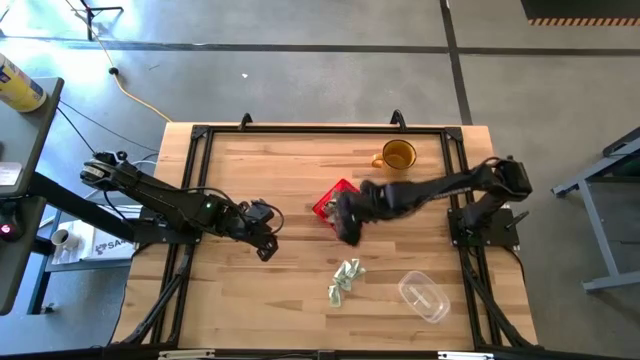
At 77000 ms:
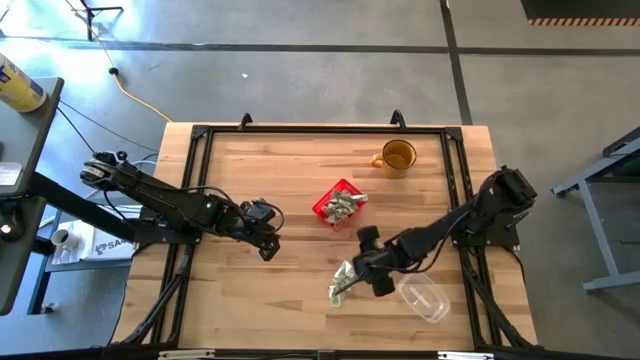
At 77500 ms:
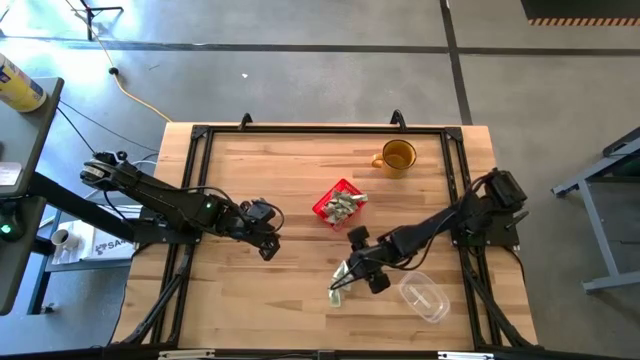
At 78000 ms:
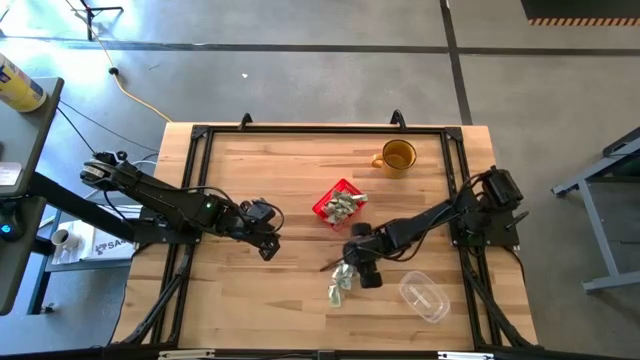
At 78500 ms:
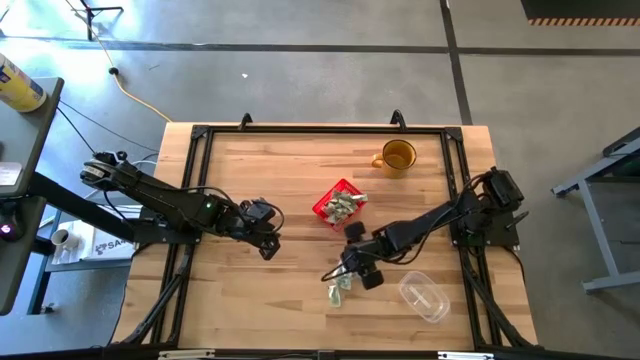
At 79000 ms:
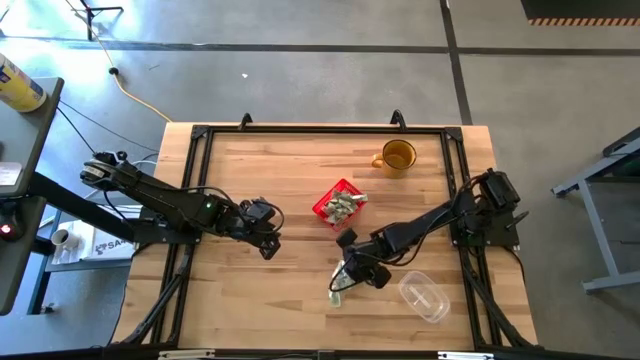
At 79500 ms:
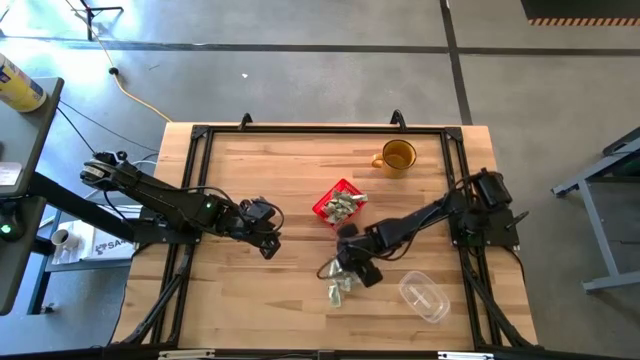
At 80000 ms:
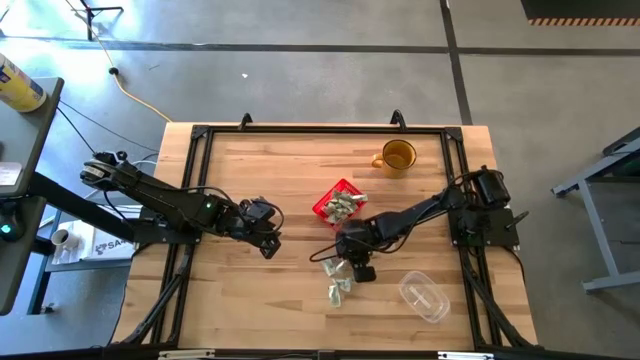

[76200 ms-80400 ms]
Task: Pick and place items into bin
Put the white stevia packet into the red bin

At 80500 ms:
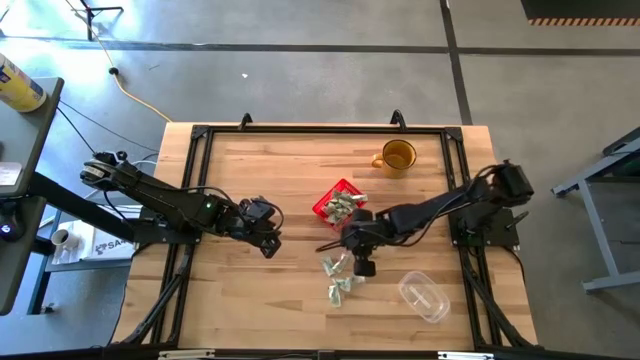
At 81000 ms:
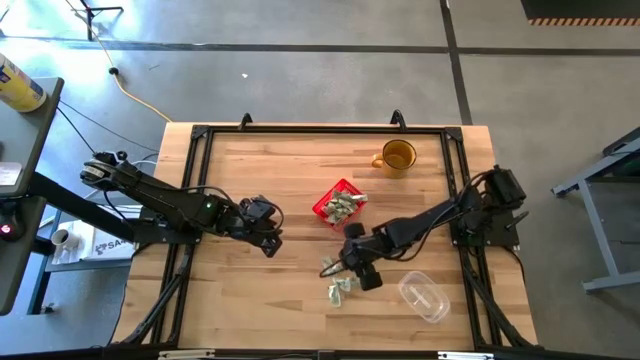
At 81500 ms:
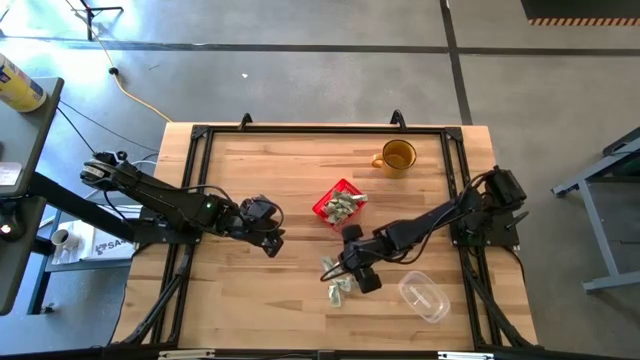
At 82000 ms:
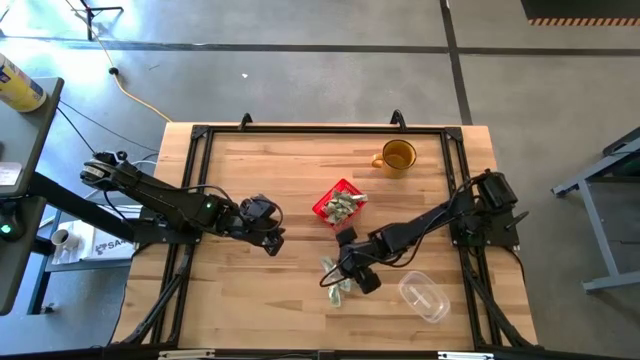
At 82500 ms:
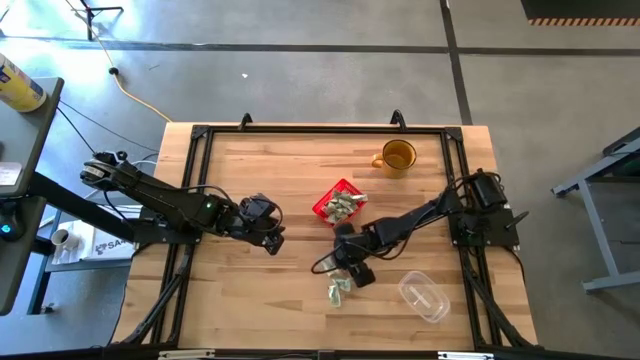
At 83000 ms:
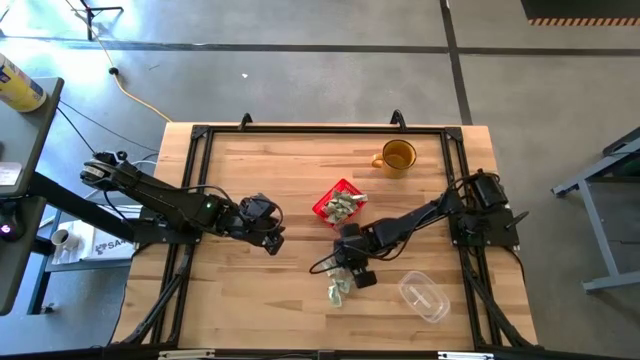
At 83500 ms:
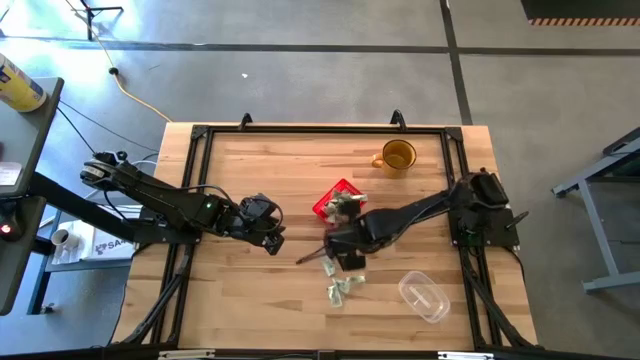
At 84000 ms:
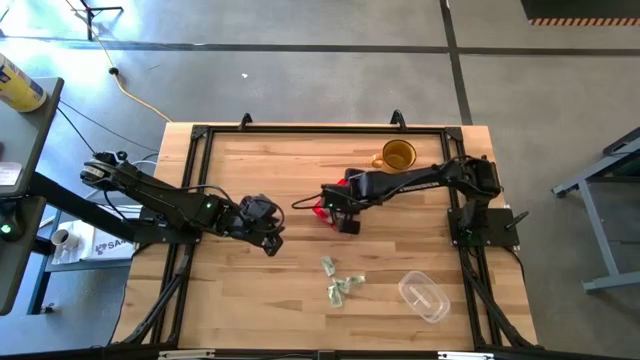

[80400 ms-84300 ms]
Put the white stevia packet into the red bin

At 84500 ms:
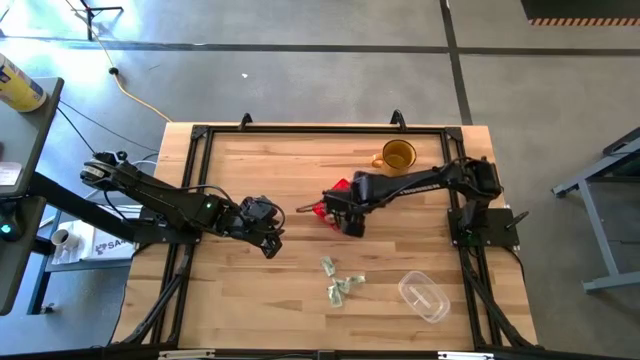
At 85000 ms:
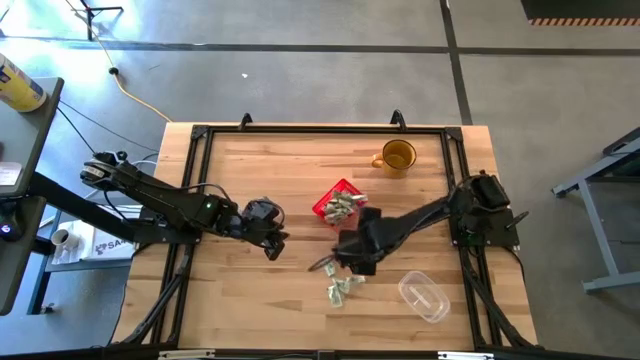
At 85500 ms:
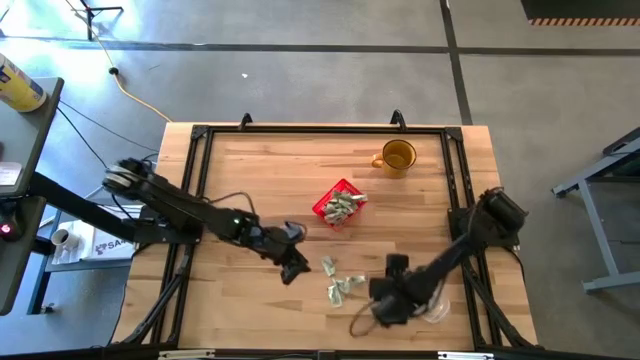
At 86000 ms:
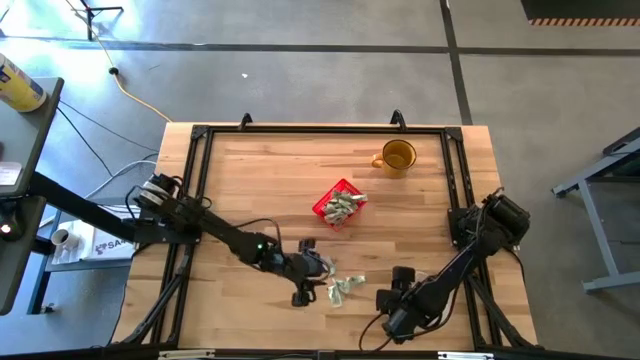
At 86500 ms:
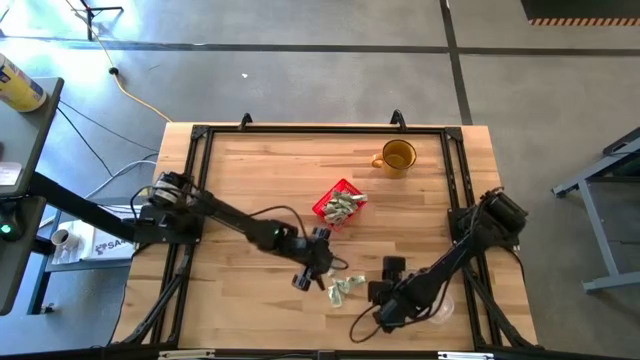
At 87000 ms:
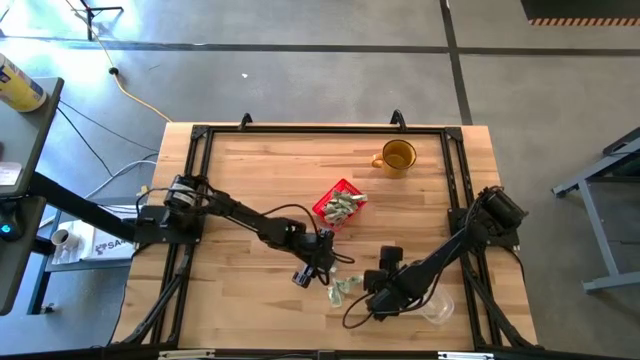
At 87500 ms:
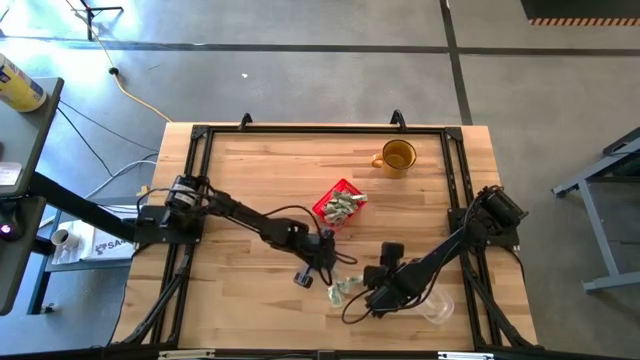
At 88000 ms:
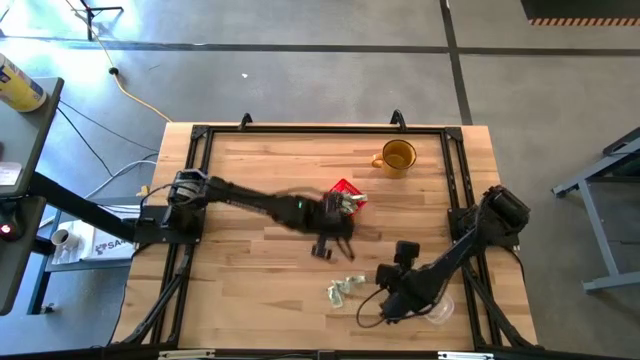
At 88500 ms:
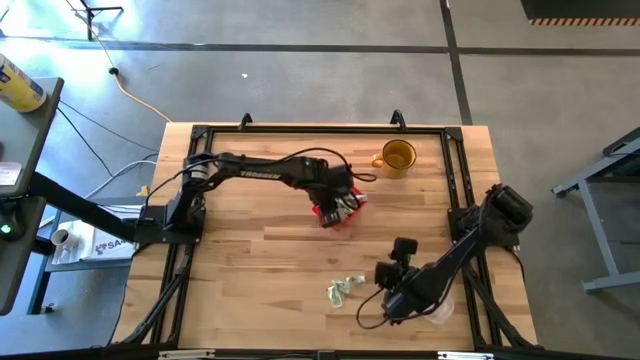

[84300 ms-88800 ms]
Put the white stevia packet into the red bin

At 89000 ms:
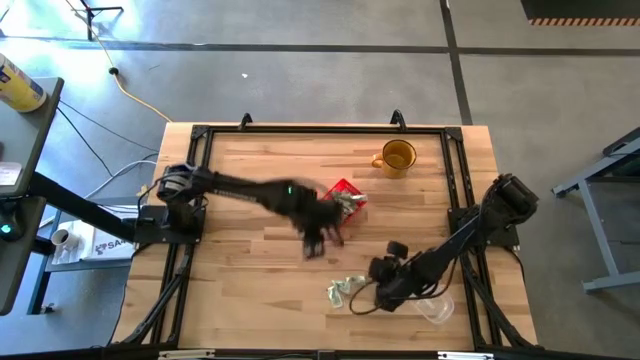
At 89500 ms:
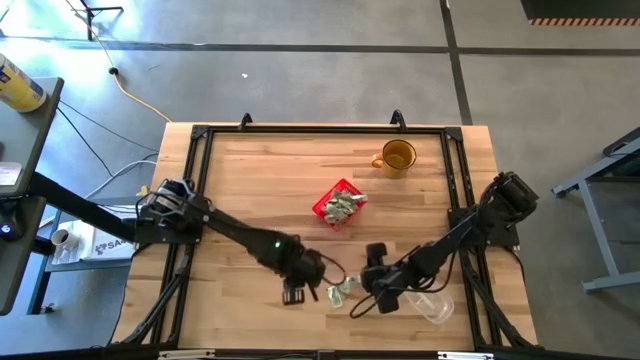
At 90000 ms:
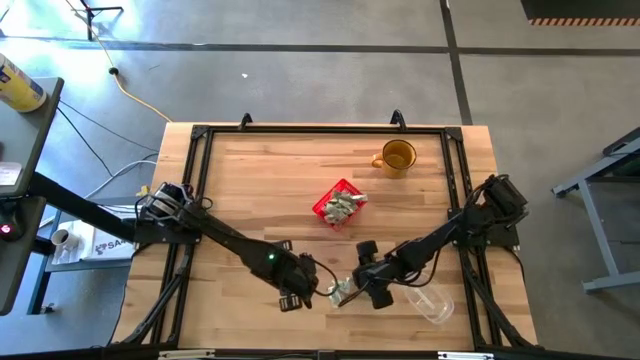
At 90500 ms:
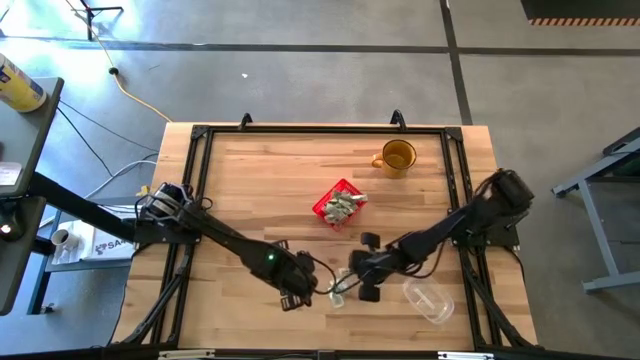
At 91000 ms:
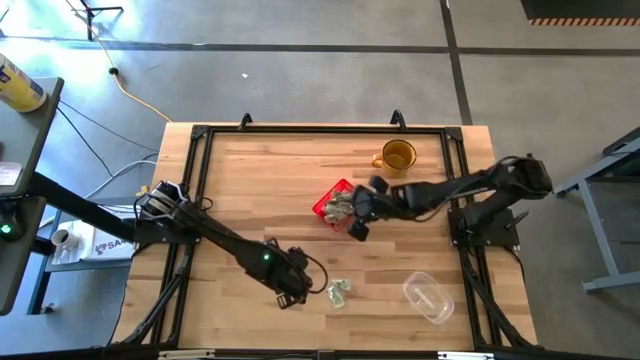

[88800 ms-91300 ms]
Put the white stevia packet into the red bin

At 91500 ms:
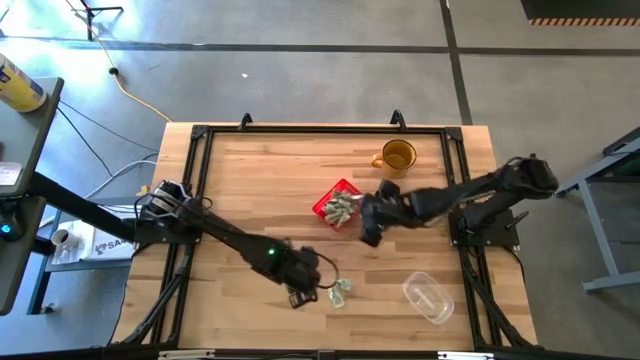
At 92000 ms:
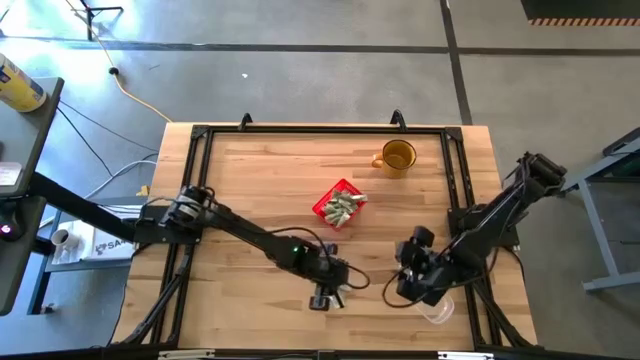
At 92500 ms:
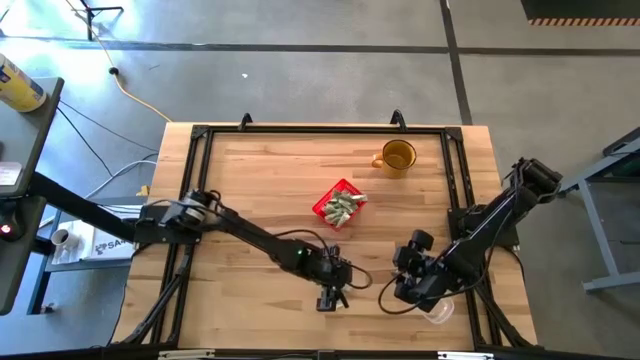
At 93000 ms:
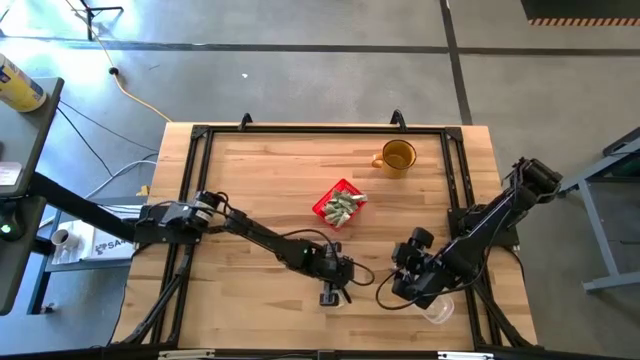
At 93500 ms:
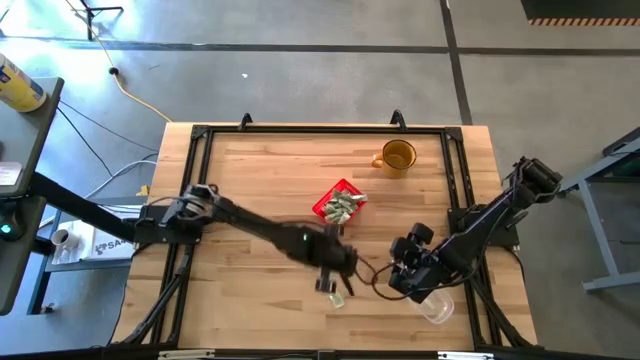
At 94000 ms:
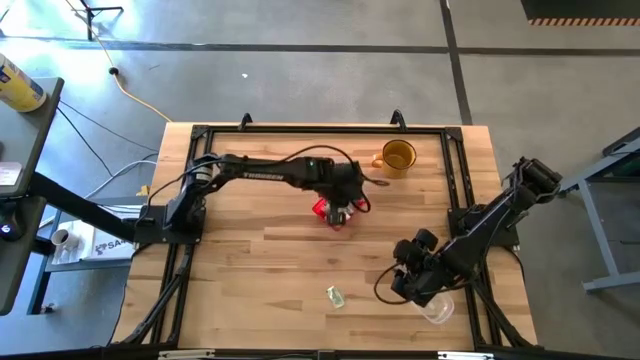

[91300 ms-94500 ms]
Put the white stevia packet into the red bin

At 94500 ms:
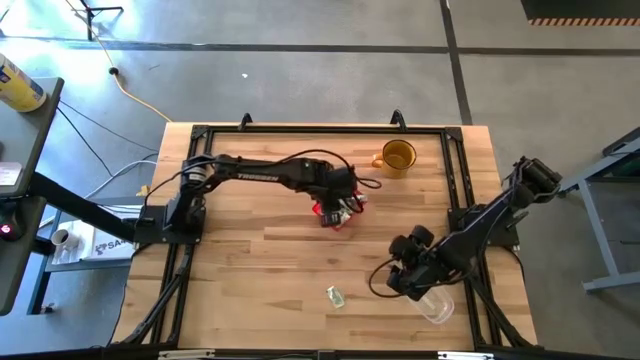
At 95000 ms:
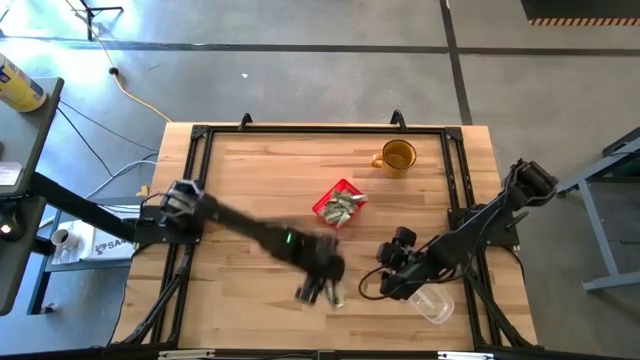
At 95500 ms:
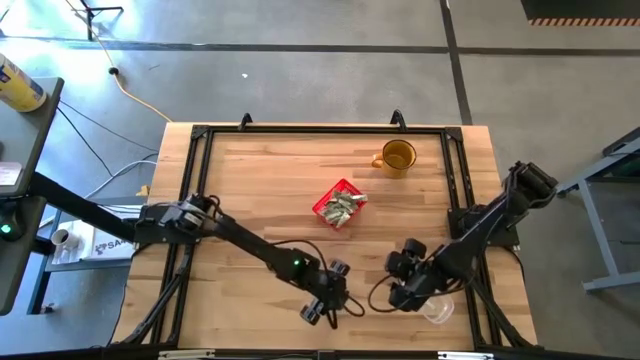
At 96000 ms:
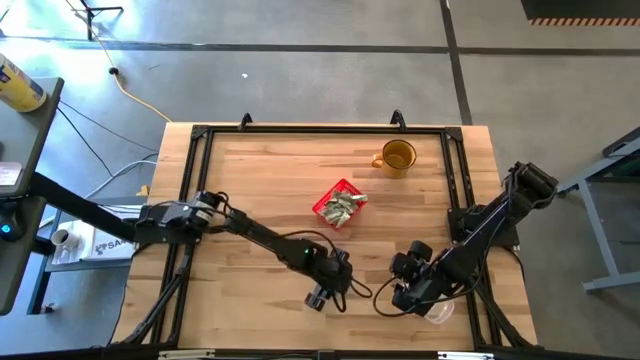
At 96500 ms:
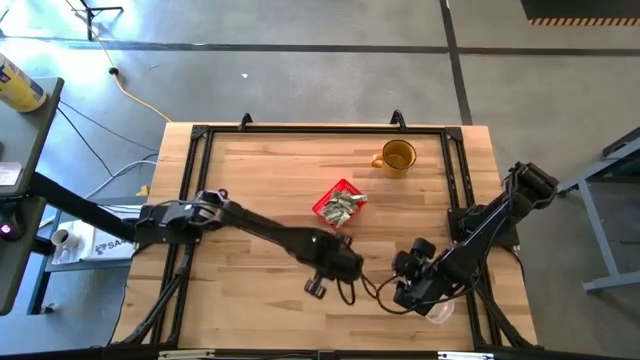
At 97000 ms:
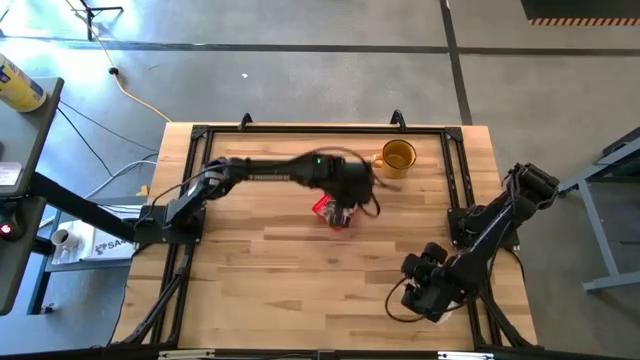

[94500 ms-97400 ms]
Put the white stevia packet into the red bin
